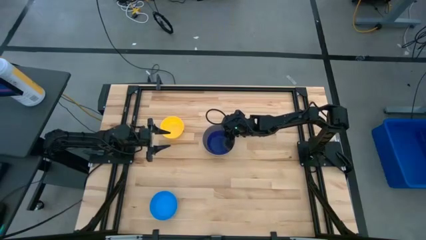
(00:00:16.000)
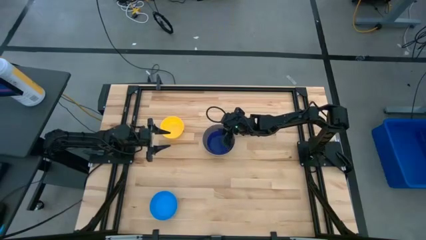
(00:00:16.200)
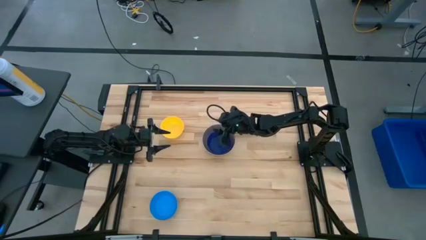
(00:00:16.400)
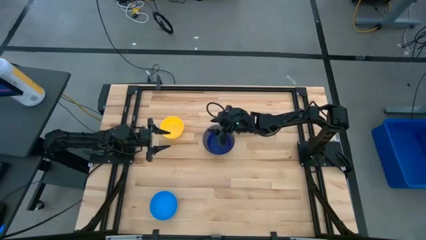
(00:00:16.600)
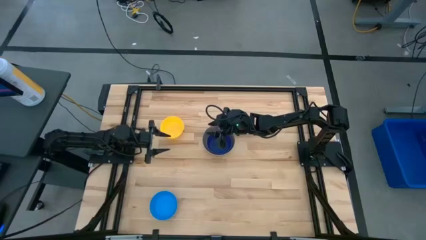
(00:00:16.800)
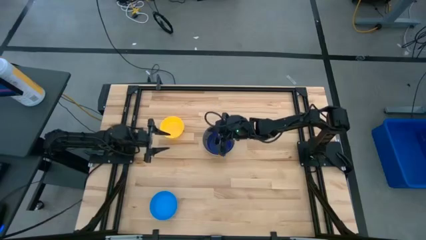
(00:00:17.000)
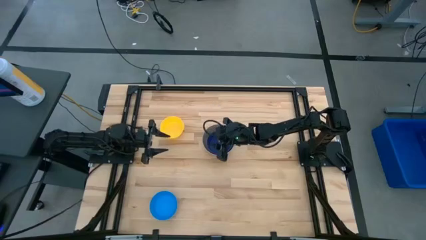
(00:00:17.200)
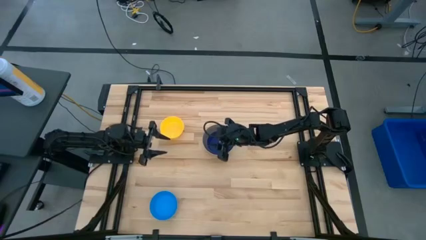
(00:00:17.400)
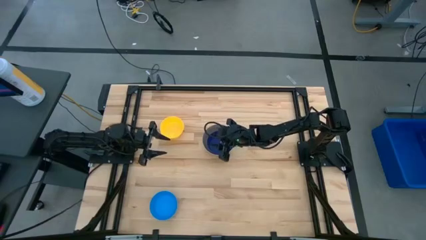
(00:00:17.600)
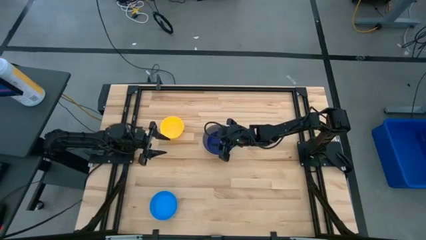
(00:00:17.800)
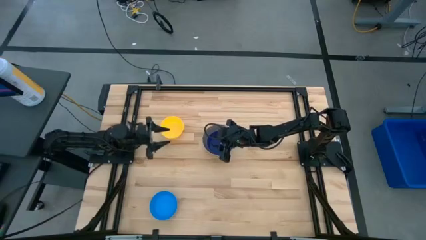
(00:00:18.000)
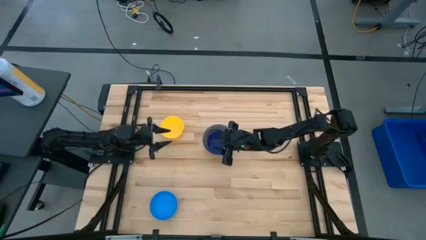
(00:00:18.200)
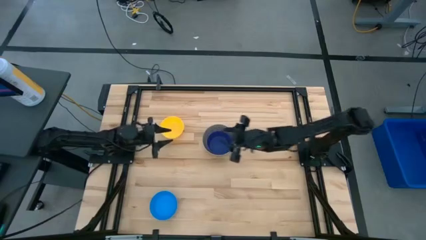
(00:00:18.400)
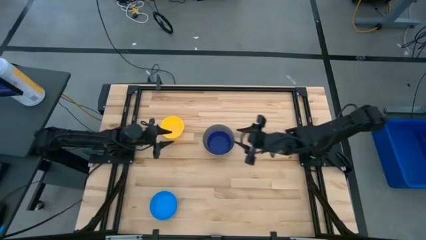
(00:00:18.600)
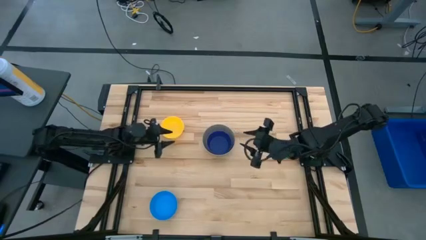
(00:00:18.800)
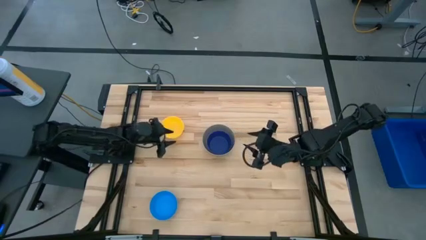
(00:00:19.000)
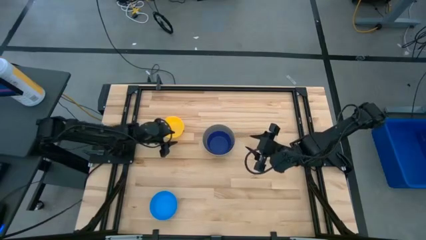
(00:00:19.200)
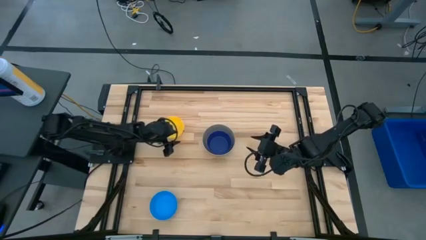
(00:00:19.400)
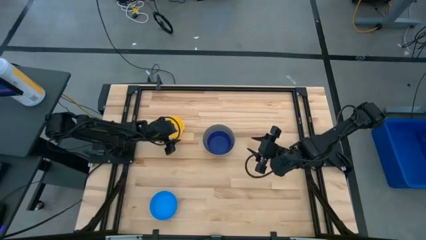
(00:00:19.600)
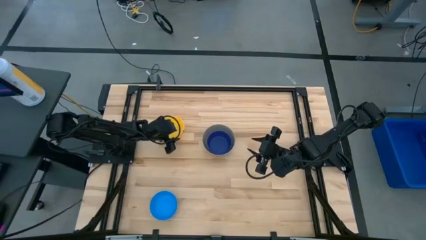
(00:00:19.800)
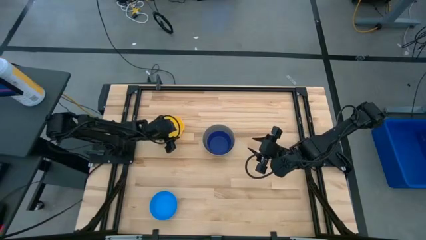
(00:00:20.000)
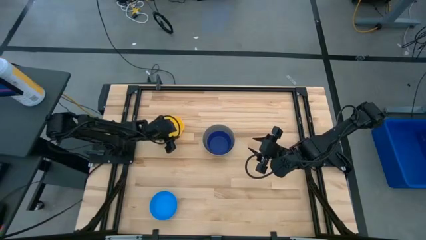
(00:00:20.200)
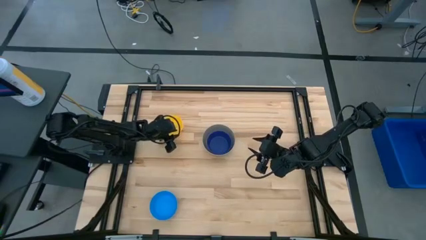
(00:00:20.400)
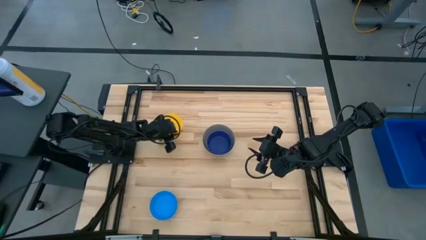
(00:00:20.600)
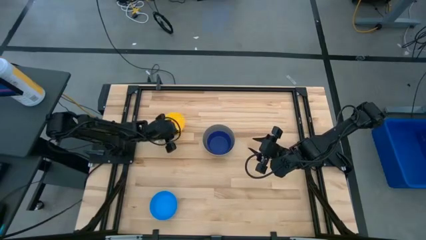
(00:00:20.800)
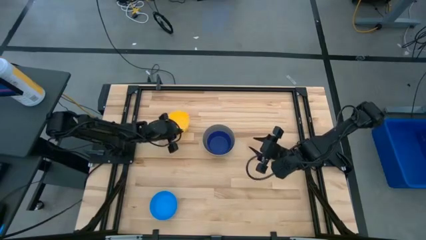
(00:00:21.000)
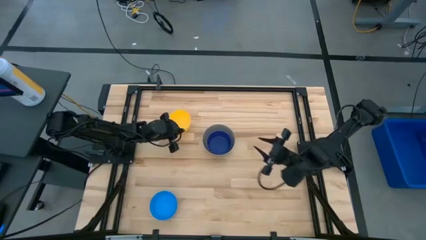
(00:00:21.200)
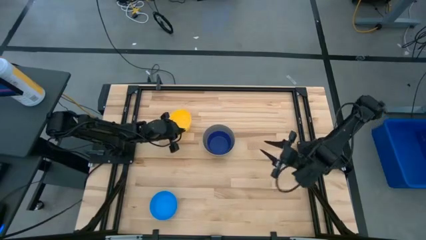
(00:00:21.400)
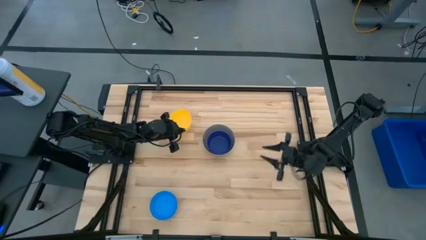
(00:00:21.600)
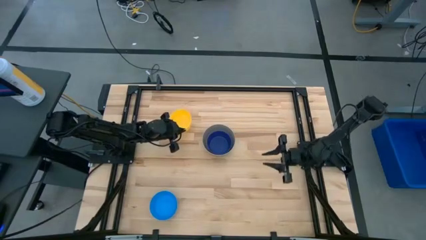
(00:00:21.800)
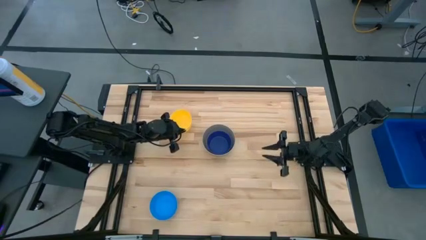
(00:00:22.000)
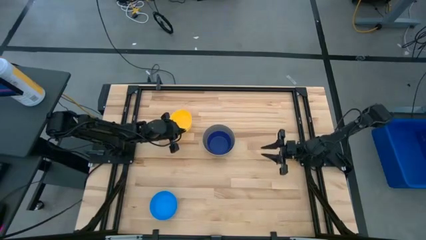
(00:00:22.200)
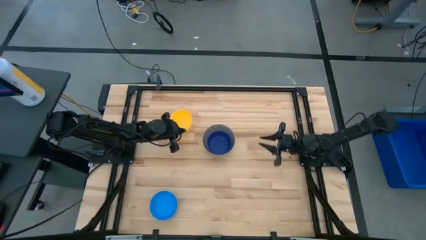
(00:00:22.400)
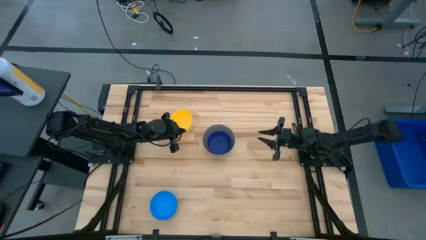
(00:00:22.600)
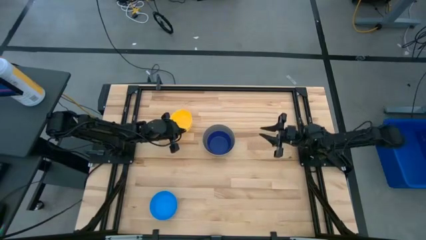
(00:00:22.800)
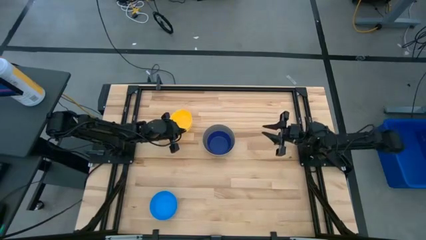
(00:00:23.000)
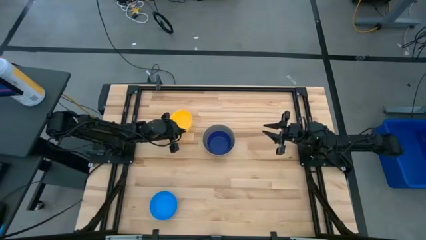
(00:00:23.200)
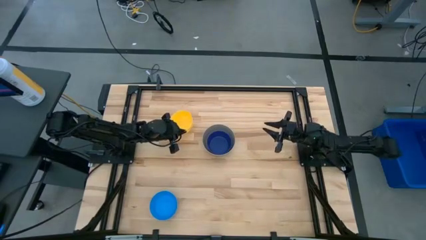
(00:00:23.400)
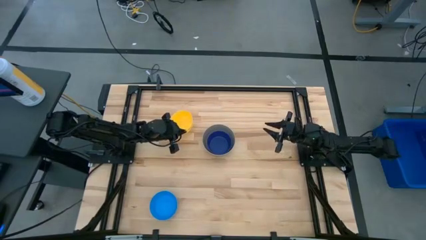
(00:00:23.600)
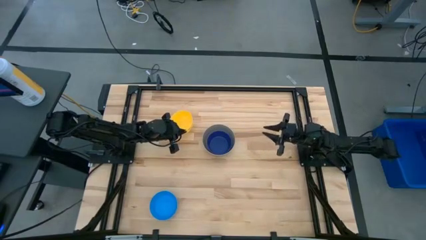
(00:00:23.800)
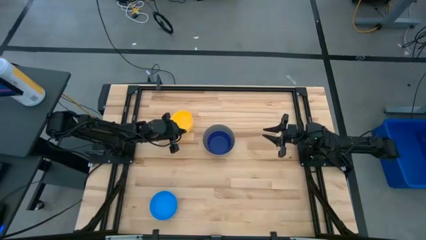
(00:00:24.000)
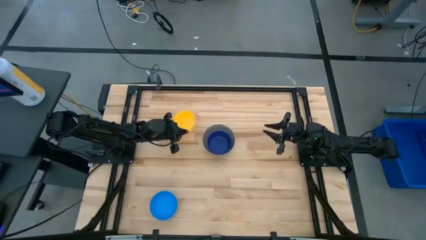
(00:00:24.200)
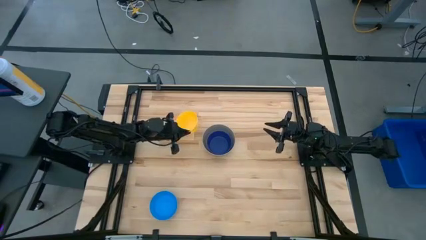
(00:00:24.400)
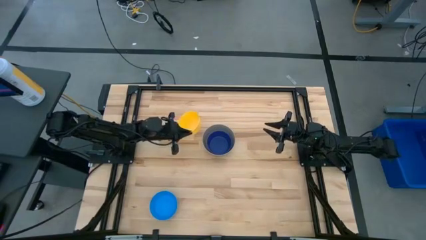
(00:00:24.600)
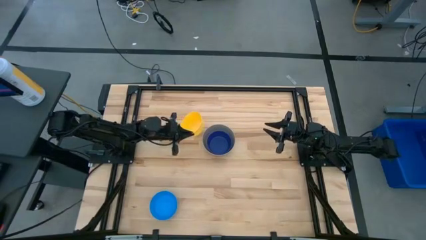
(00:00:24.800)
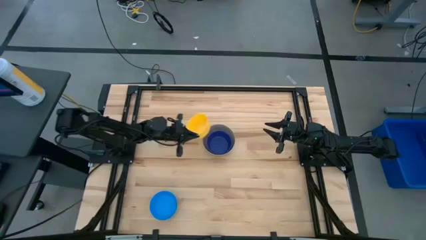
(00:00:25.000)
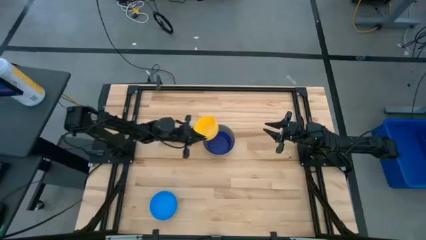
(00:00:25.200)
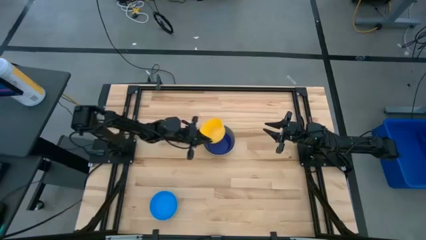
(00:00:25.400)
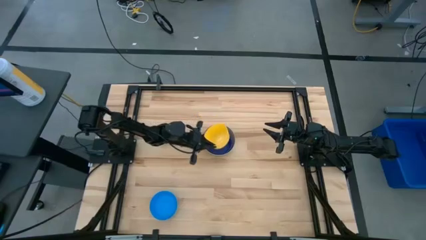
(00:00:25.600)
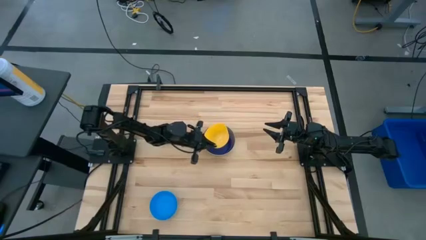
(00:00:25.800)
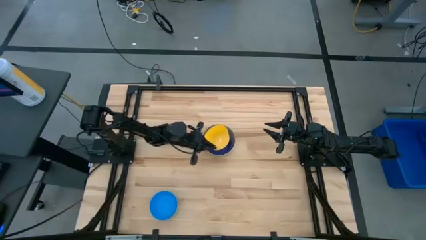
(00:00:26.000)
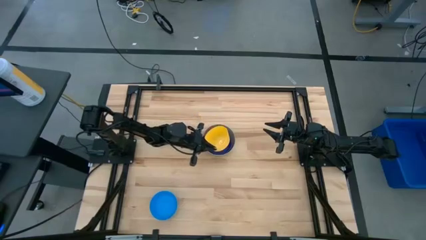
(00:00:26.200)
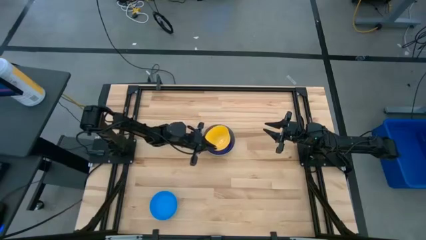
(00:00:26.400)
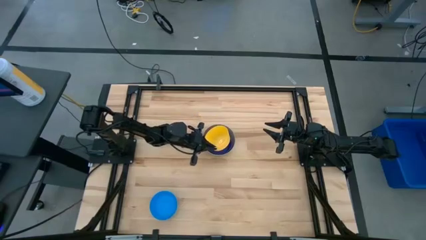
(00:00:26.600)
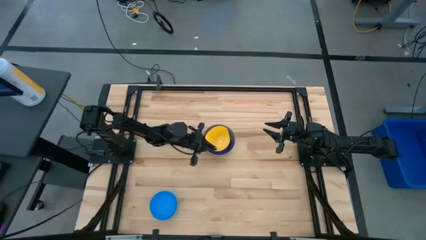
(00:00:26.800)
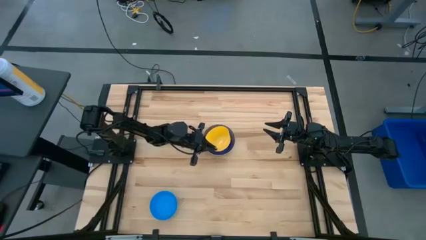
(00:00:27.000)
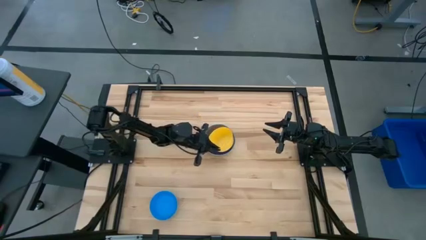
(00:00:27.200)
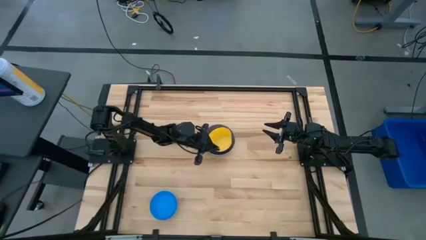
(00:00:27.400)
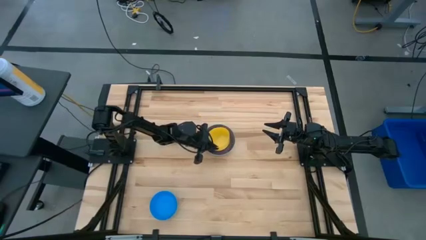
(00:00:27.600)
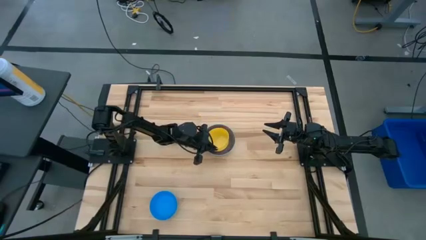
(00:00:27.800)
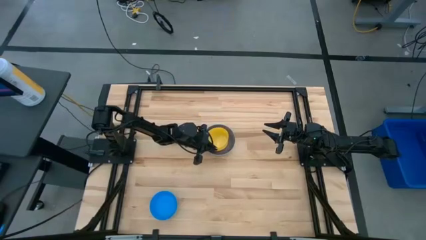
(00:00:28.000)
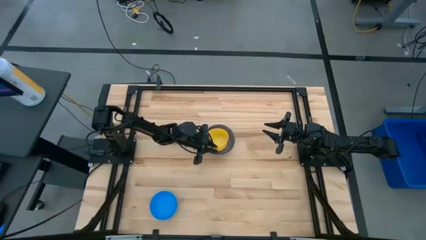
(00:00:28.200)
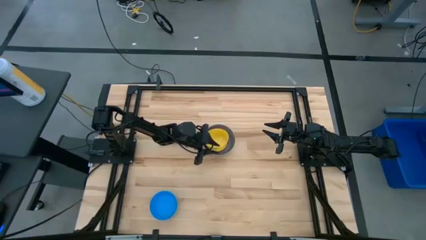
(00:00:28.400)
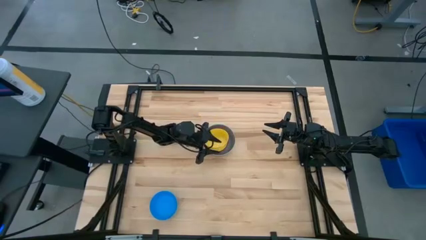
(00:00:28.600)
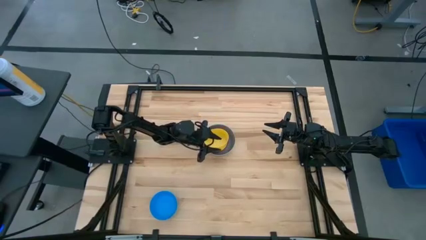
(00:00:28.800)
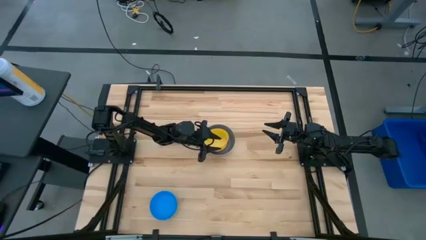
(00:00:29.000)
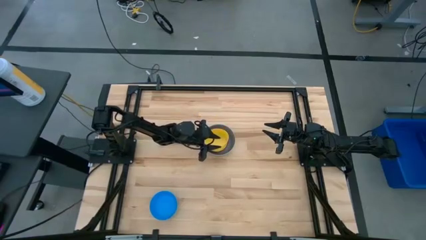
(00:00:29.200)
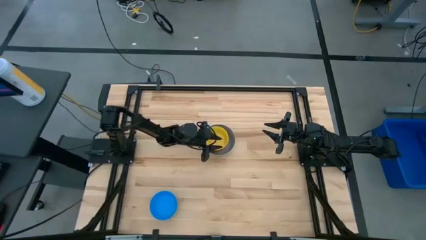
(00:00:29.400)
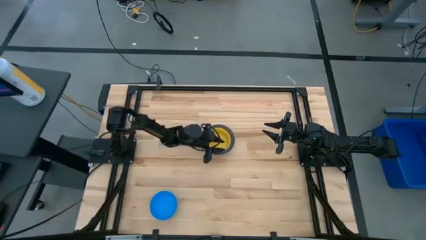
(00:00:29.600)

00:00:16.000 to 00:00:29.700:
Stack the yellow bowl on the dark blue bowl
